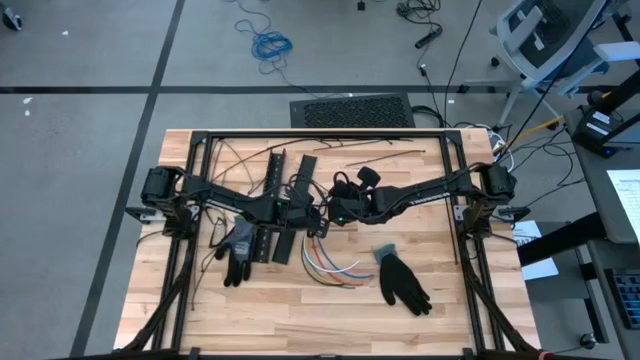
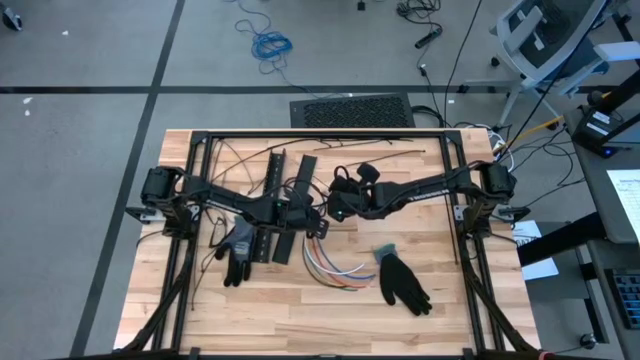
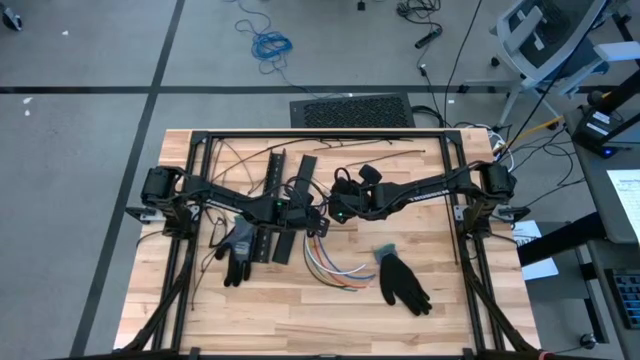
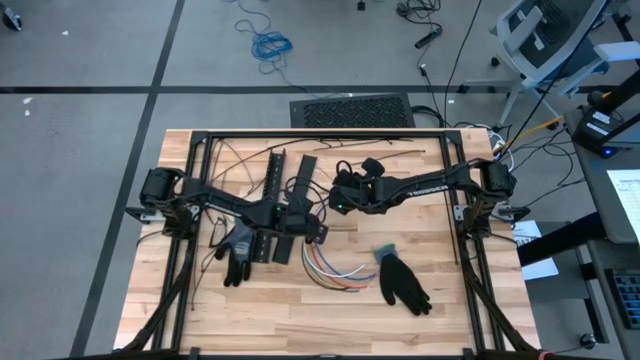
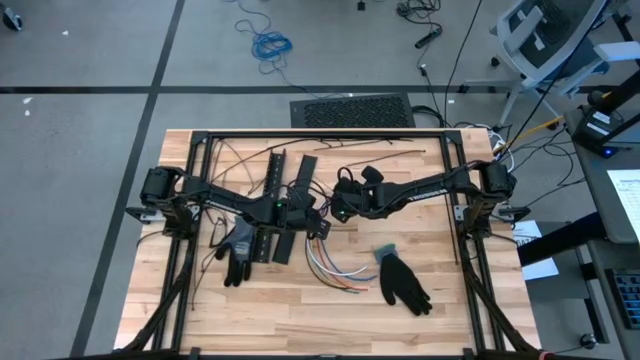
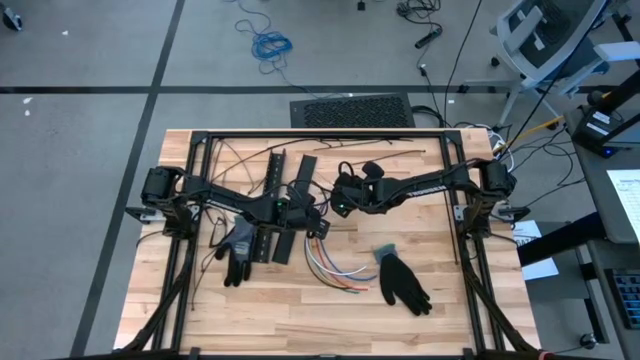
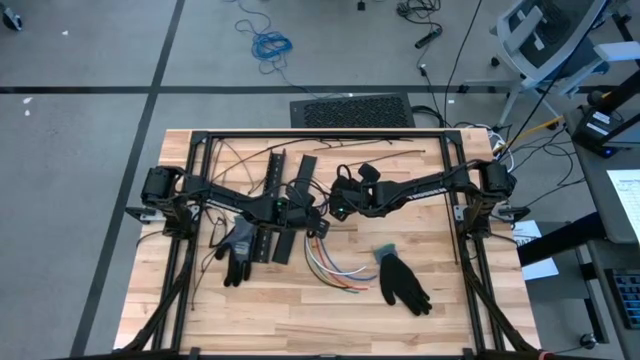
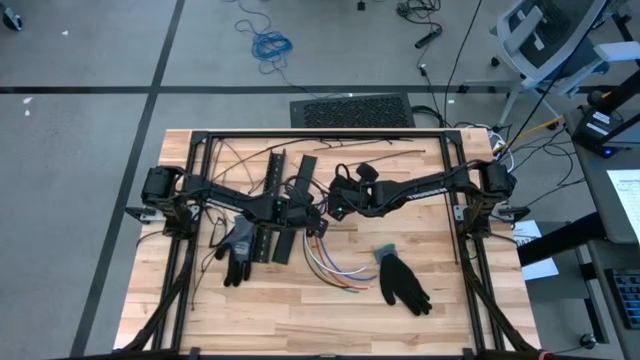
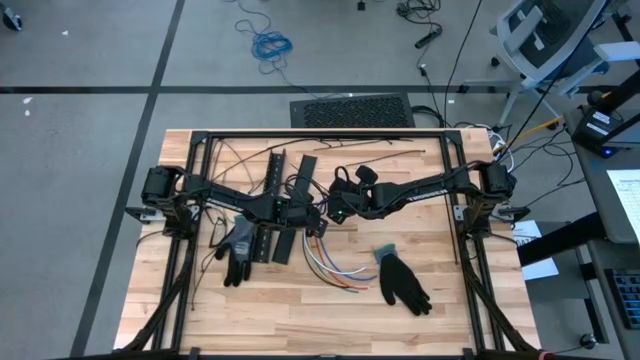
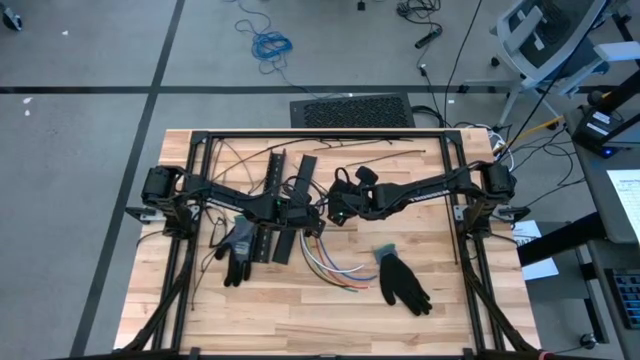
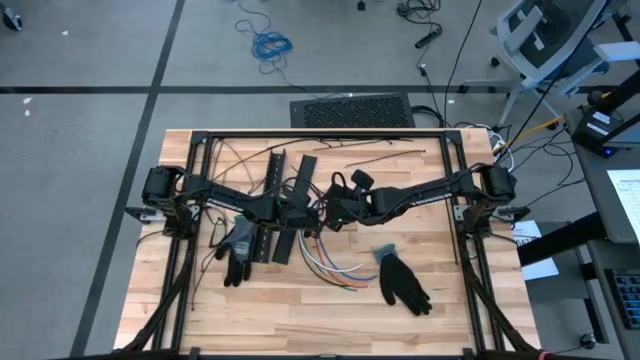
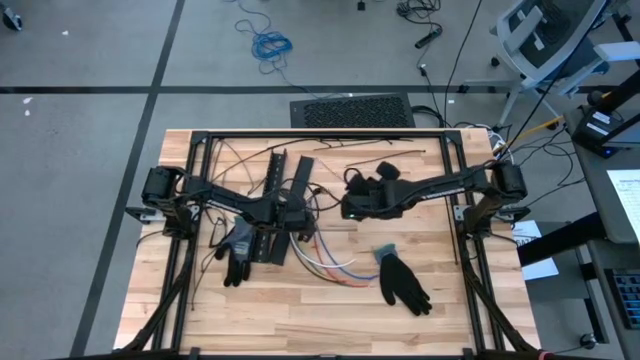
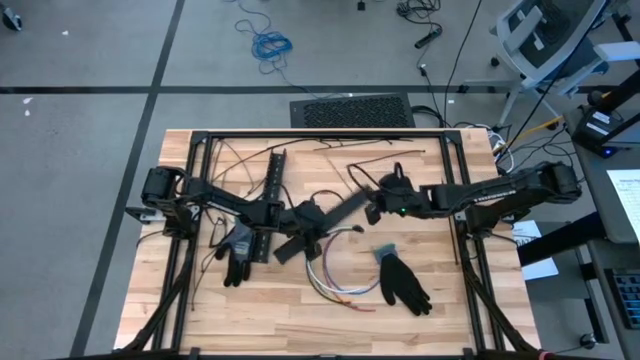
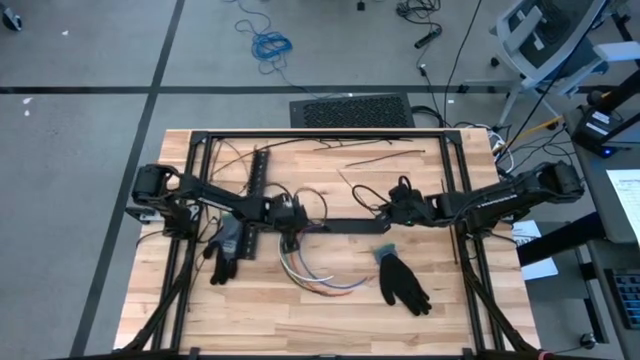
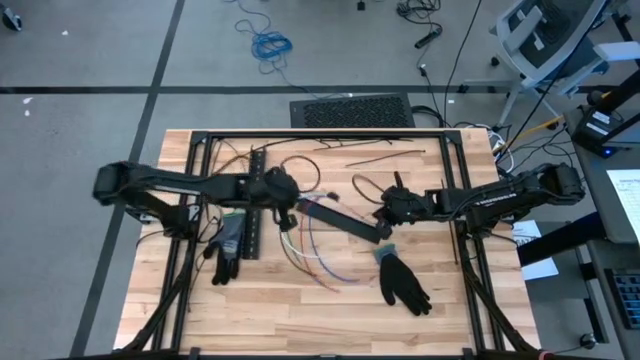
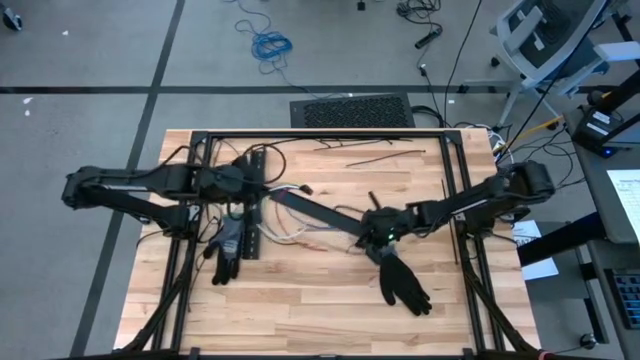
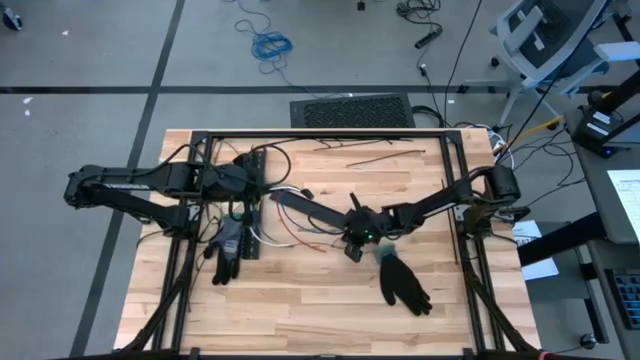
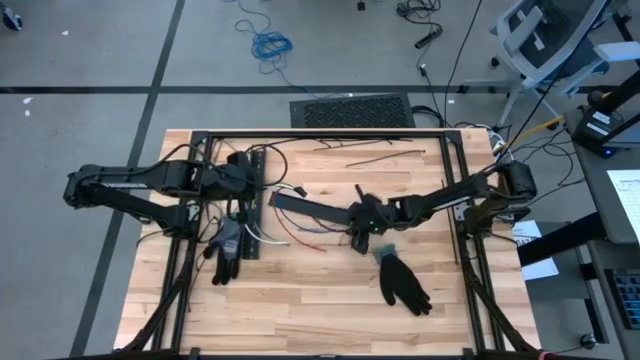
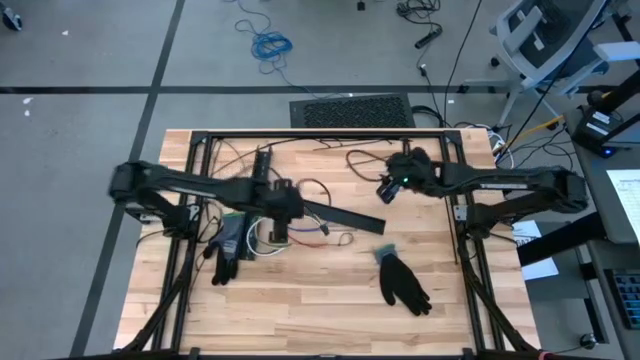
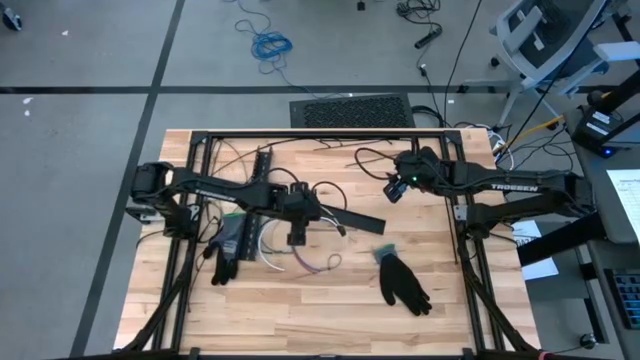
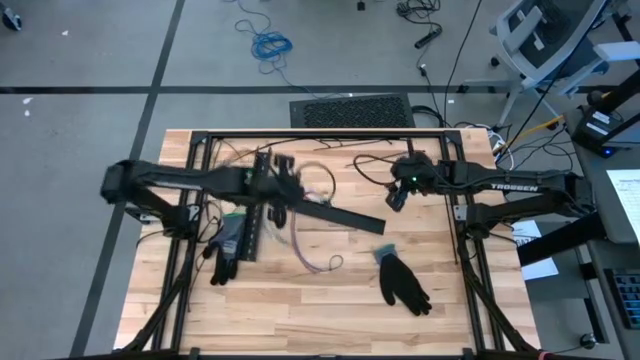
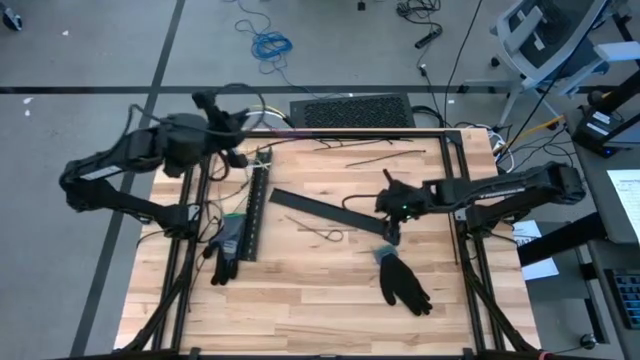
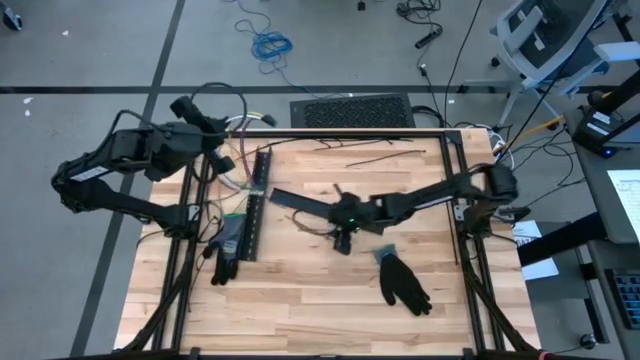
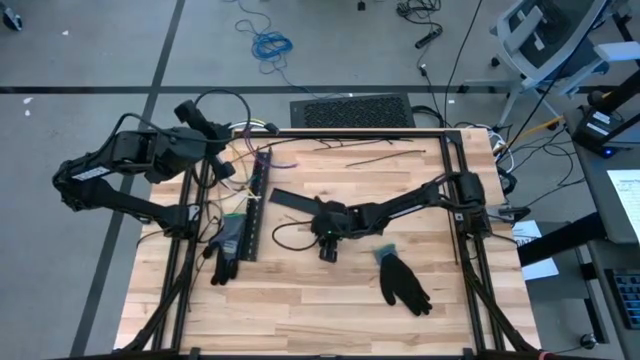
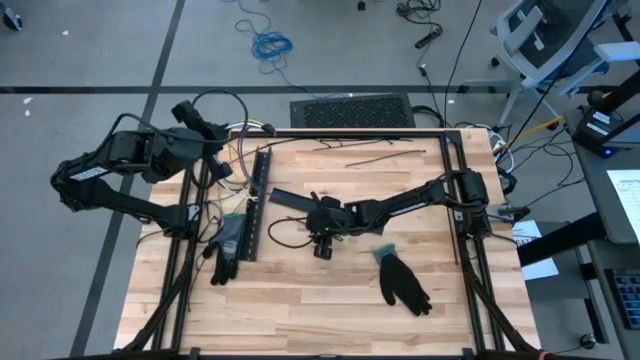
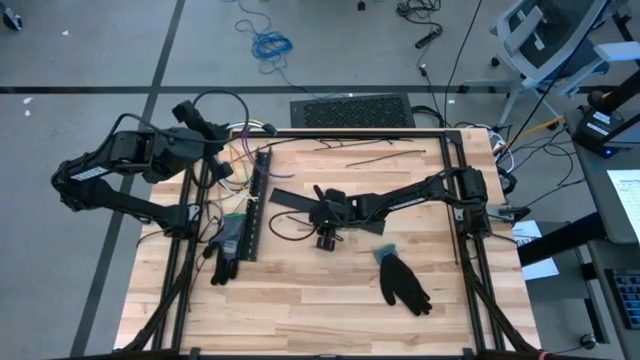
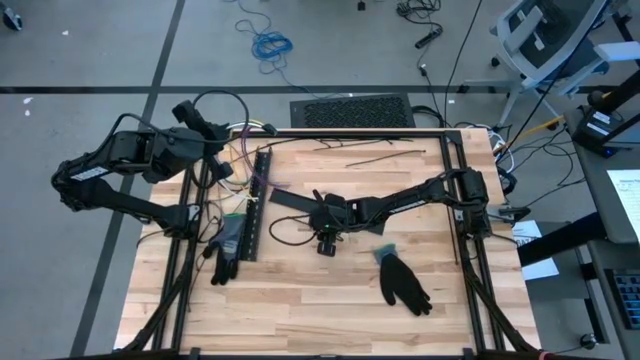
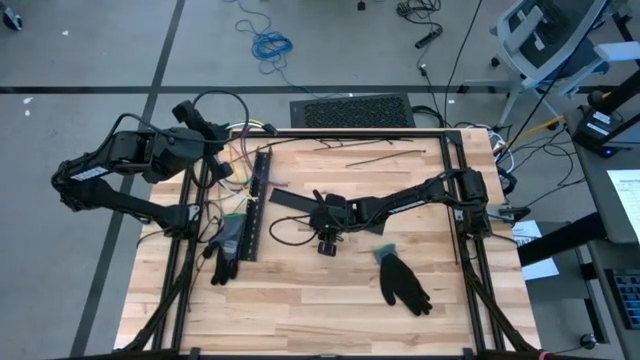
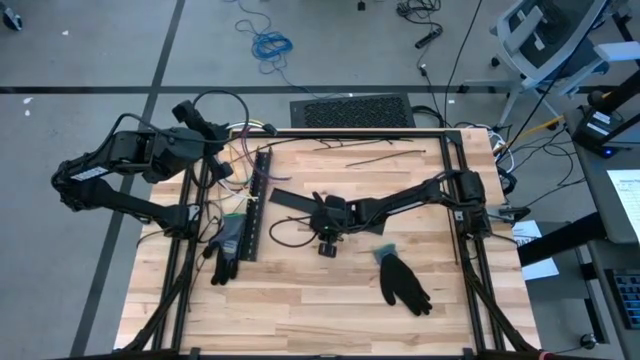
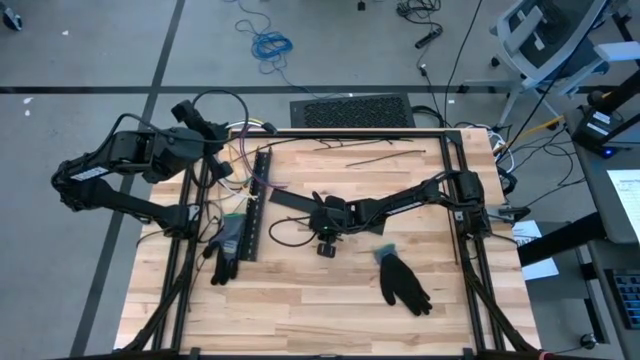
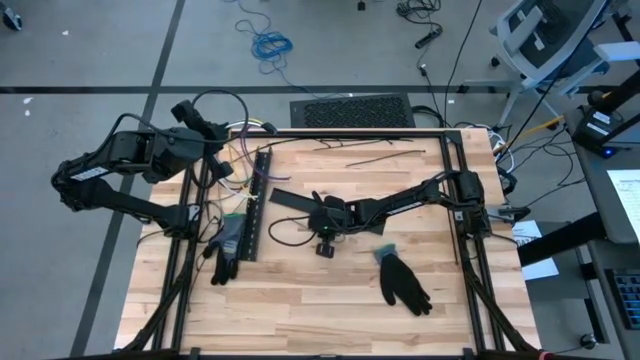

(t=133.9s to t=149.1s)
Task: Ziptie cables
Wrap the cable wires with the black ziptie

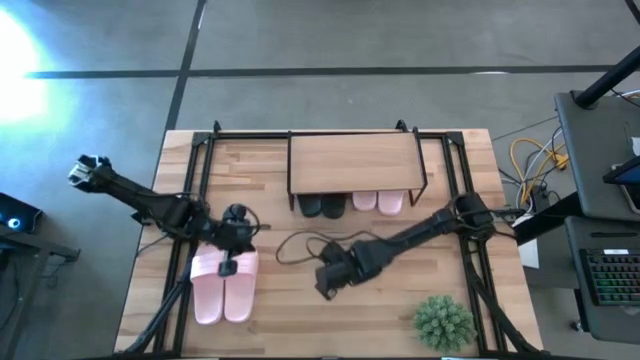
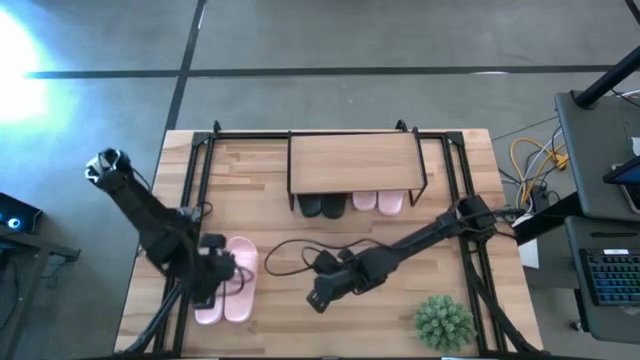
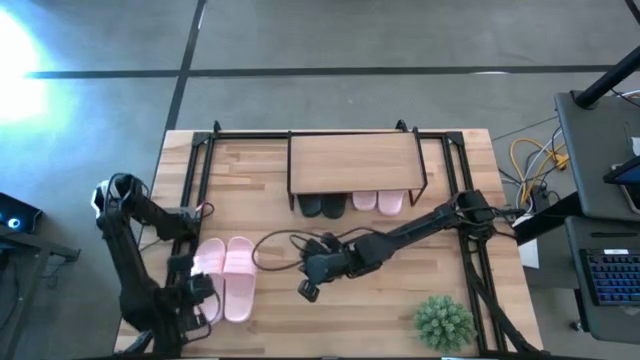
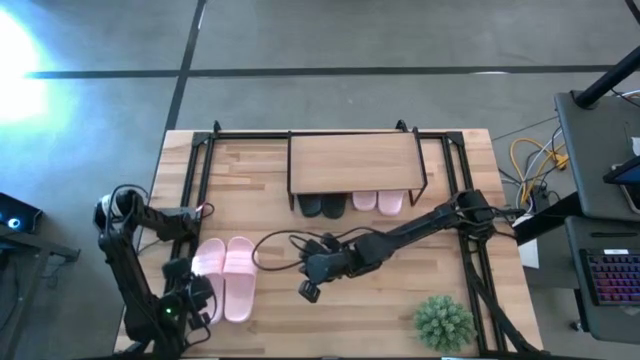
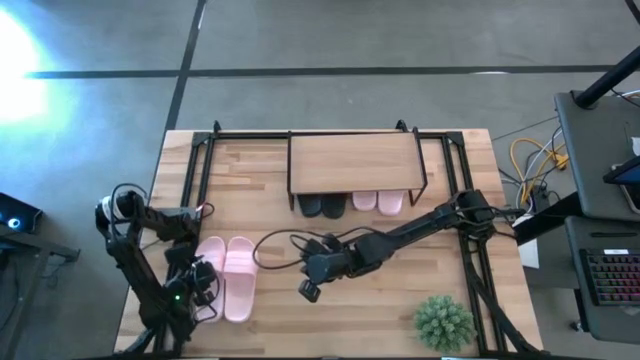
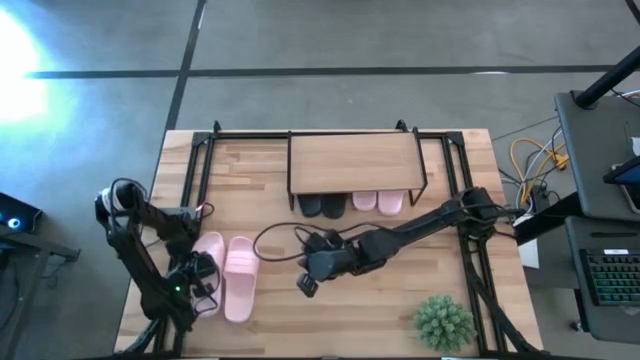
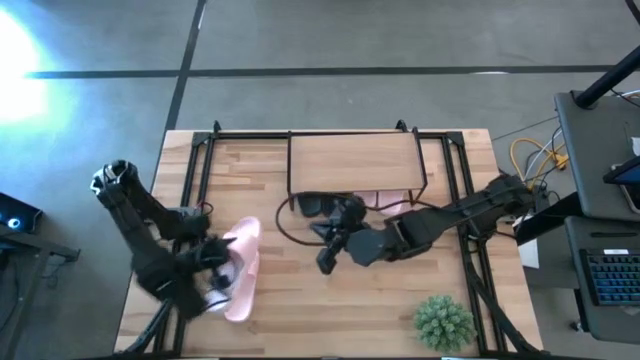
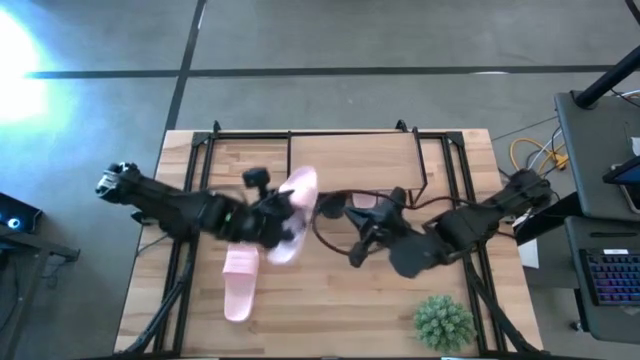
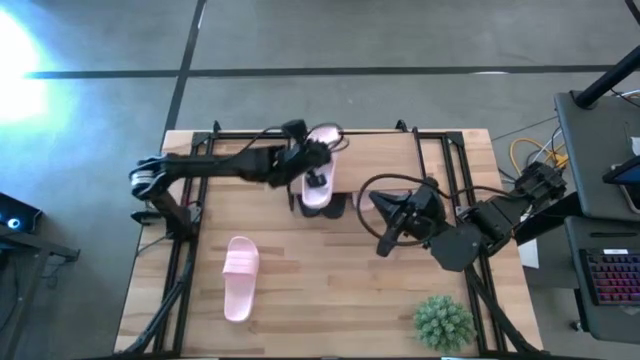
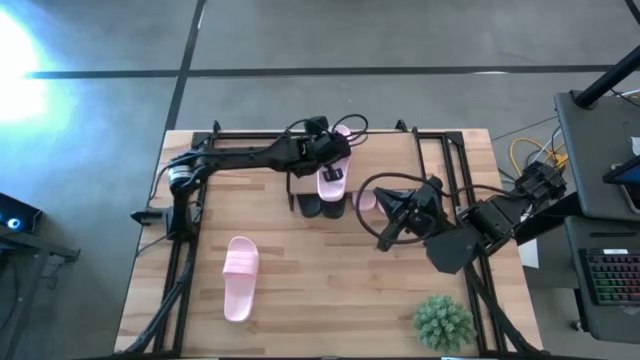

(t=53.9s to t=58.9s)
Task: Pick and place slides into the shelf
Put the pink slide on the shelf
